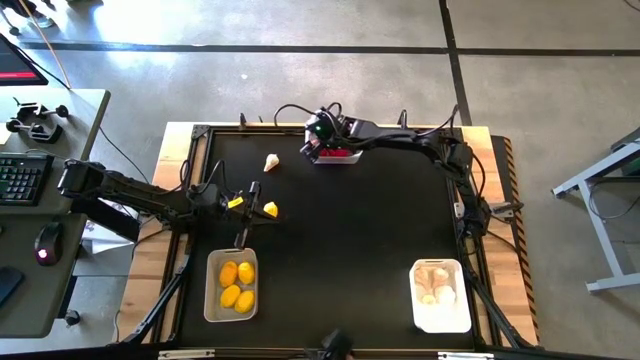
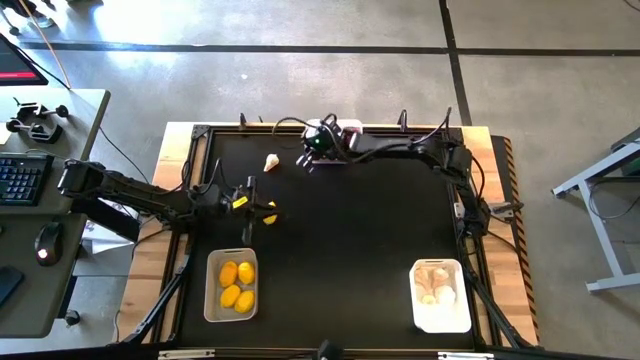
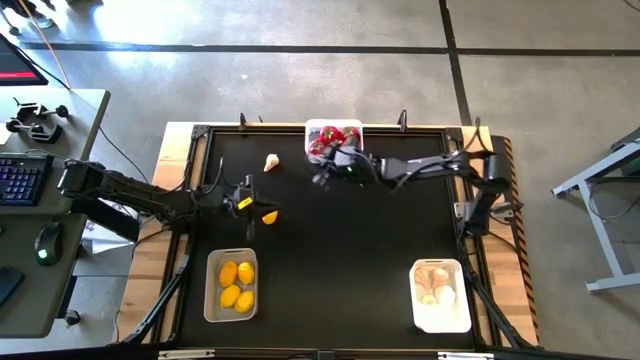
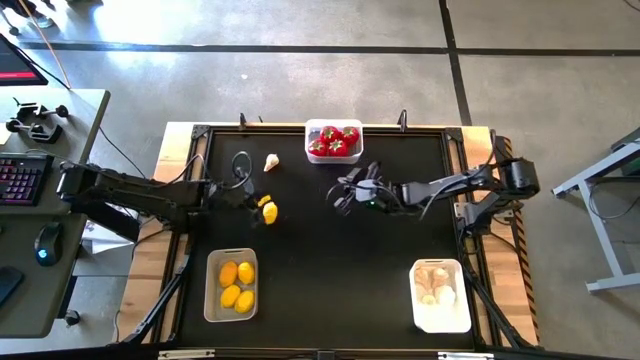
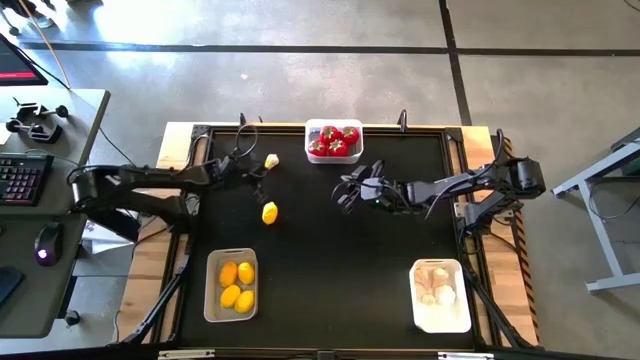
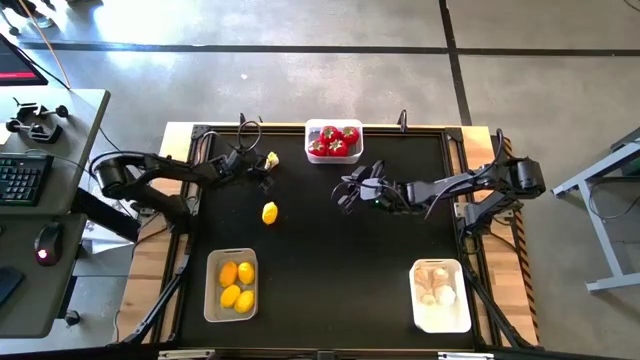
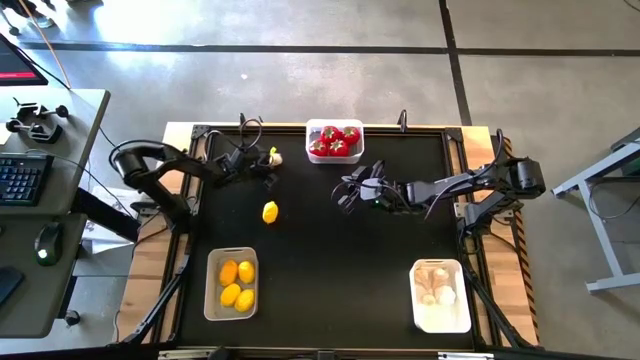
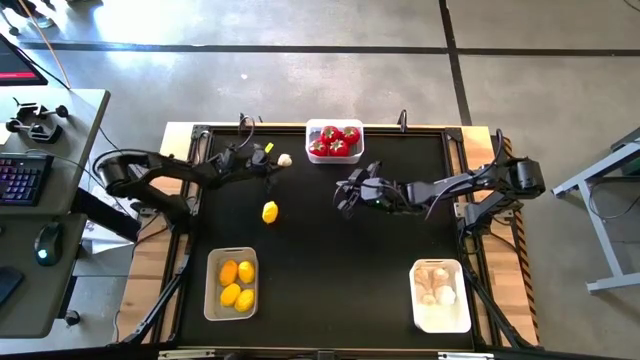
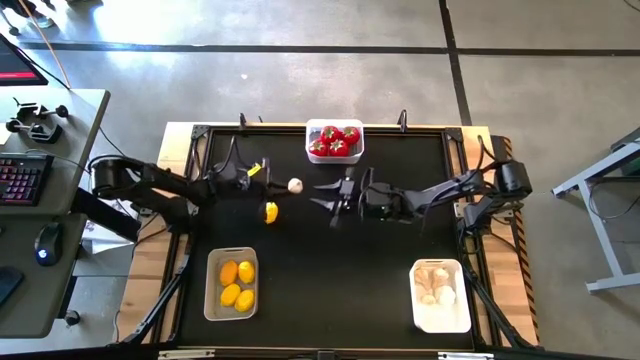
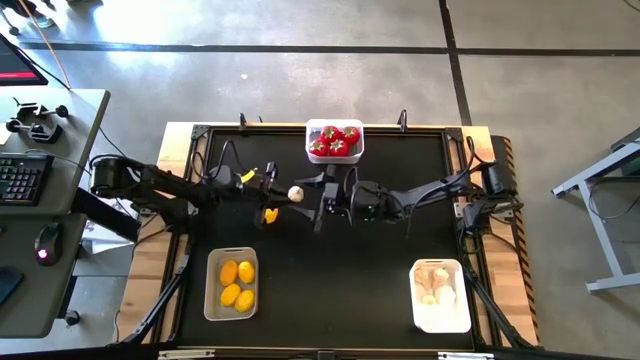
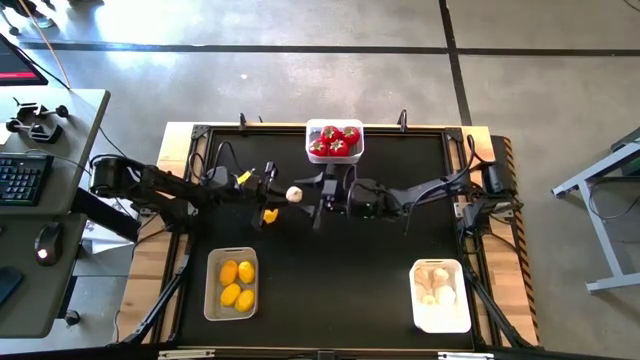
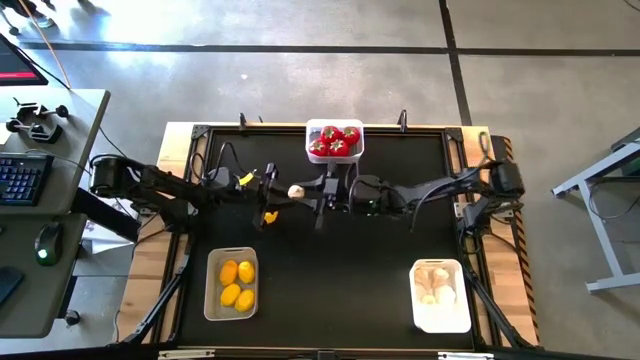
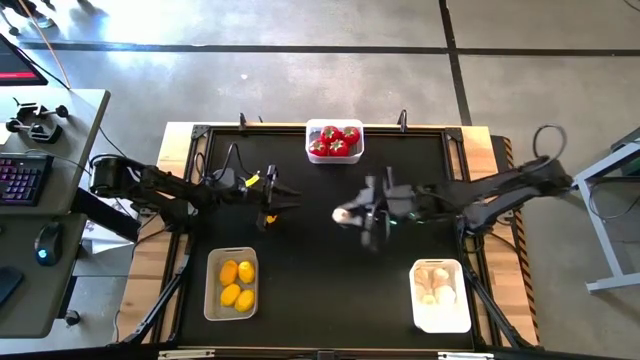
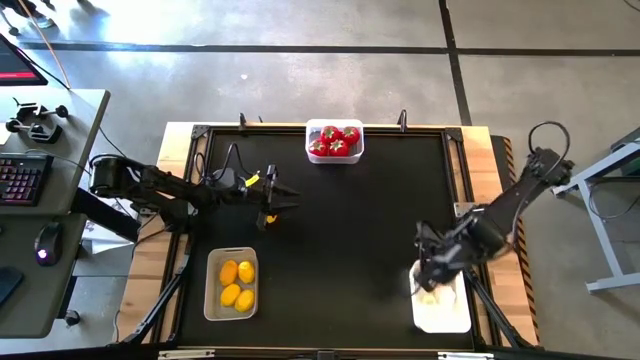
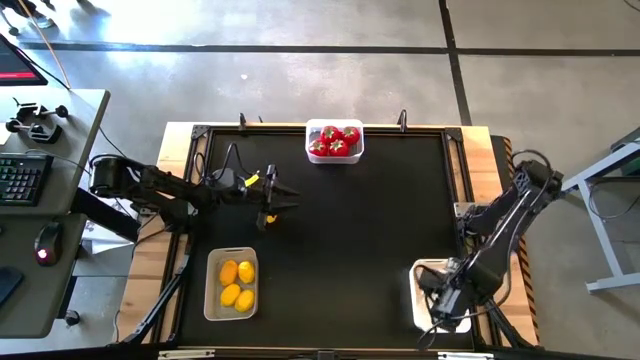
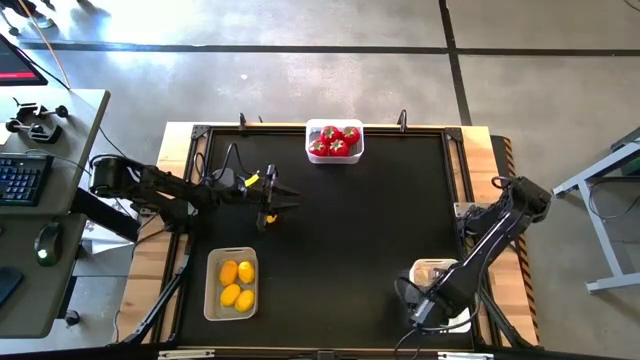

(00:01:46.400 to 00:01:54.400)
Task: Sort produce into baskets
Put the white garlic into the white bin

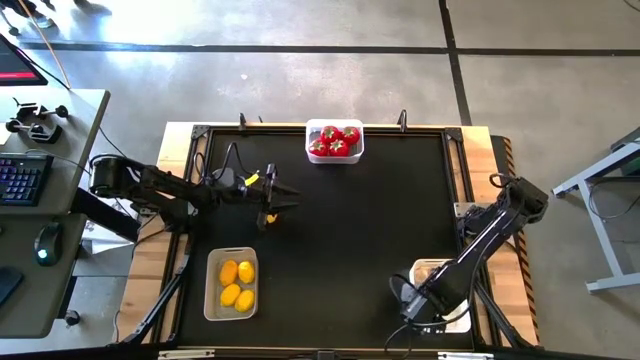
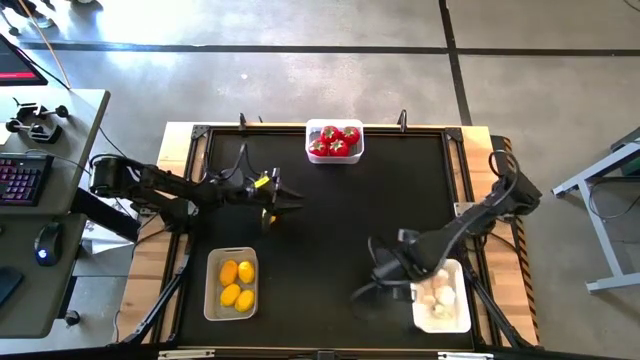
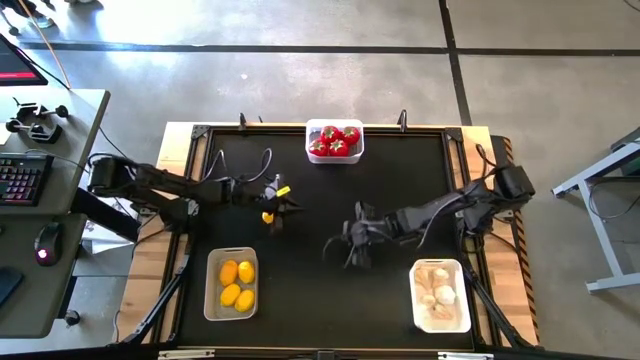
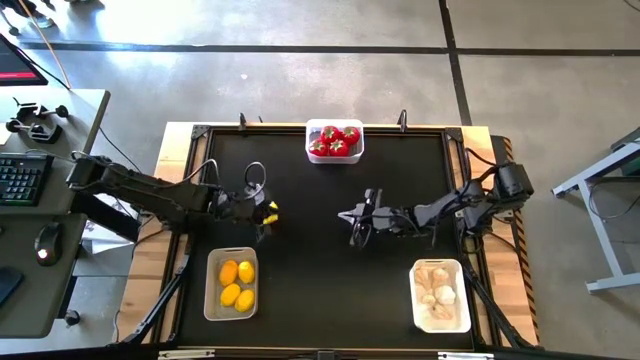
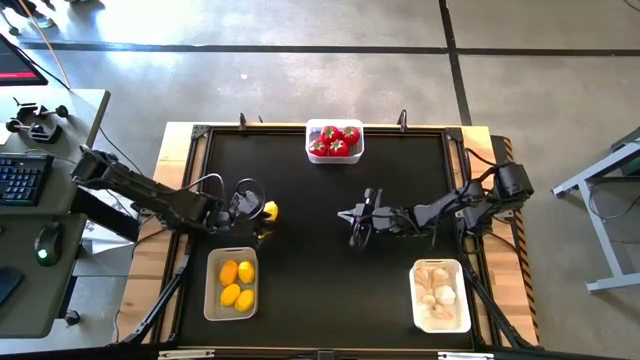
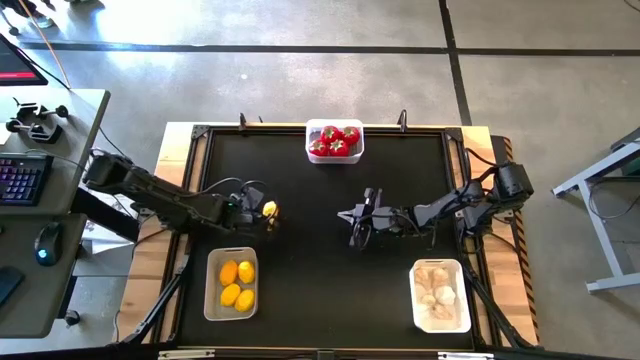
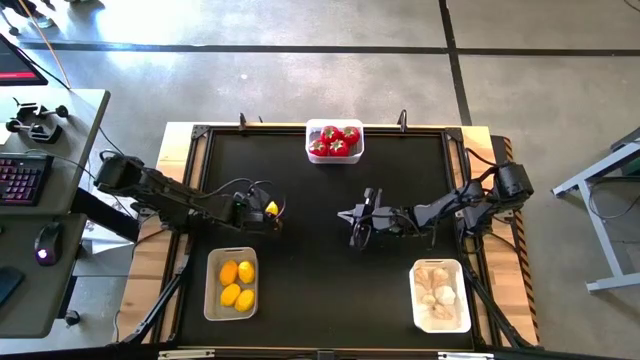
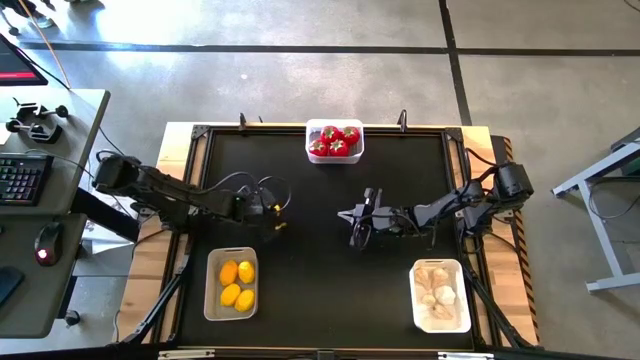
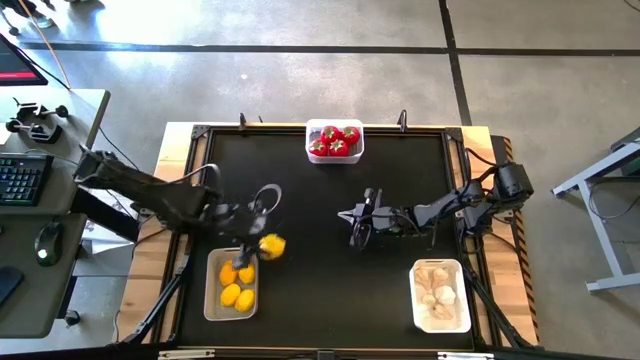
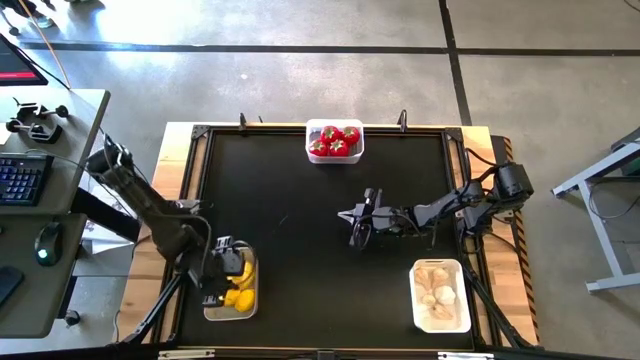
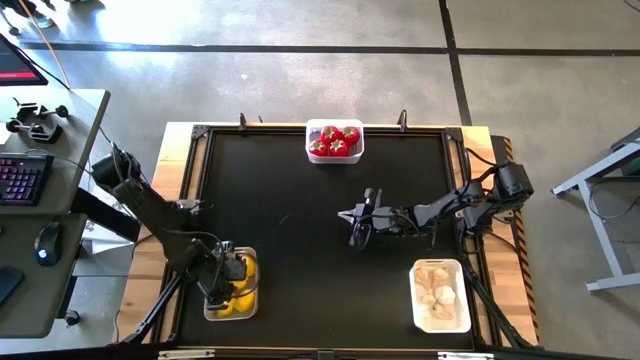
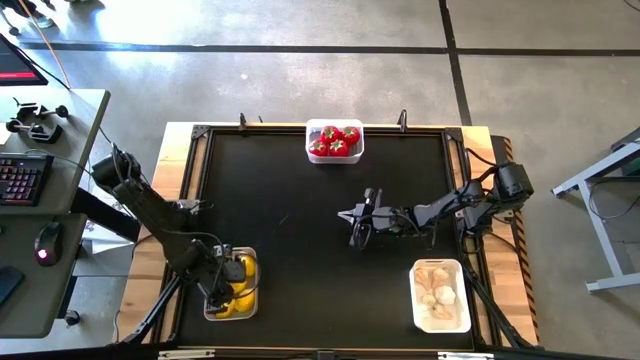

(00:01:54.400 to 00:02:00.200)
Put the yellow lemon into the gray bin

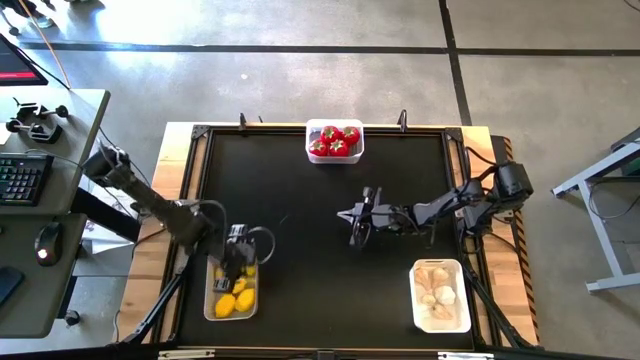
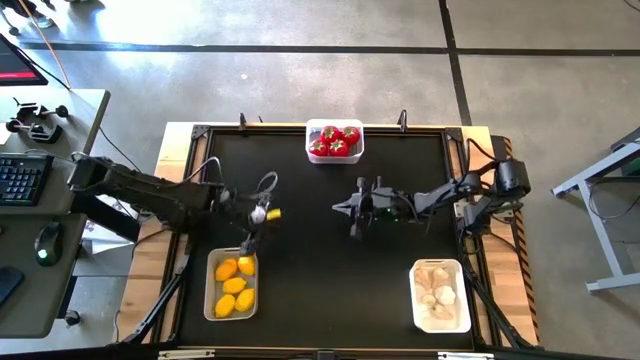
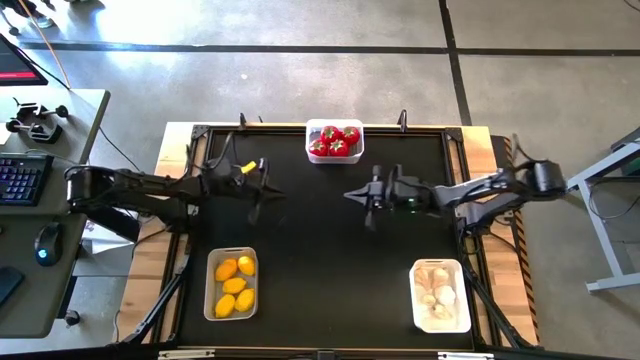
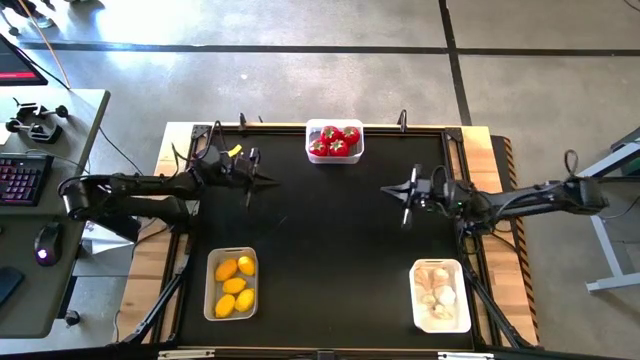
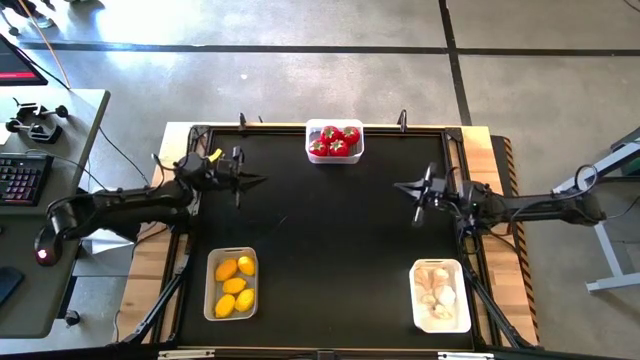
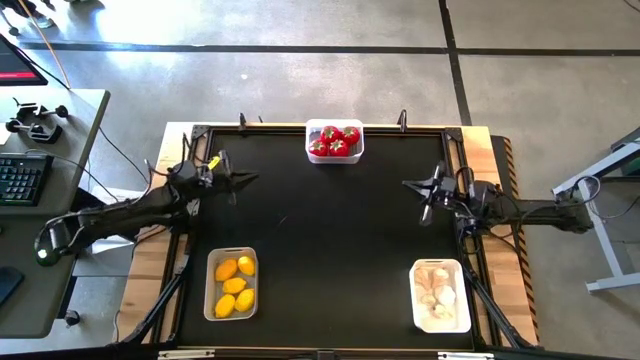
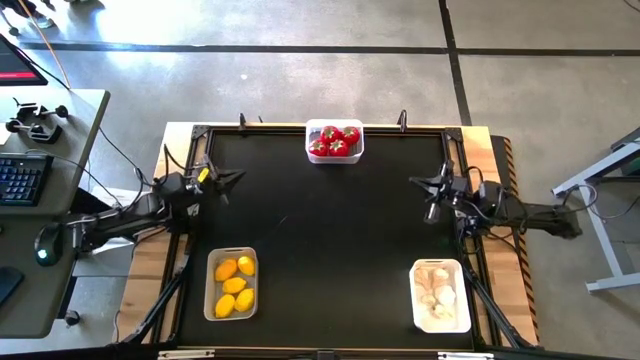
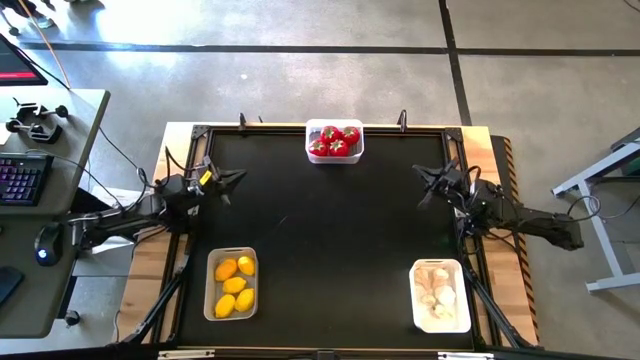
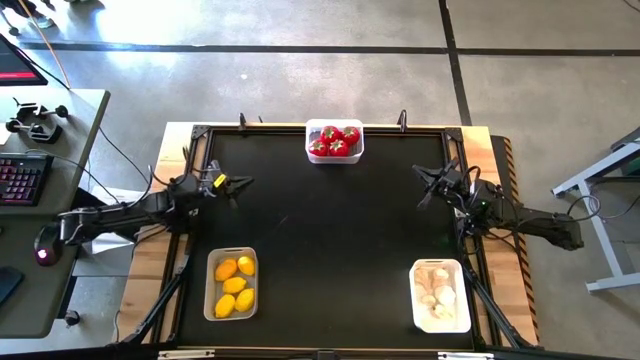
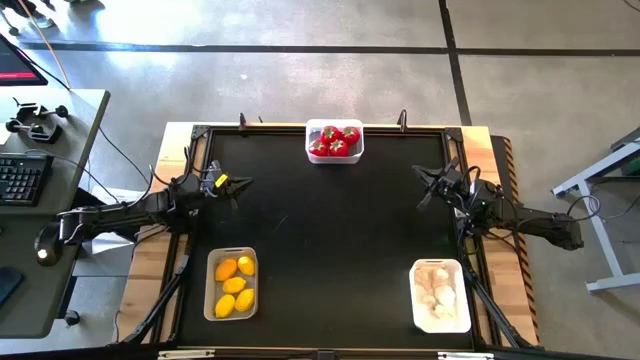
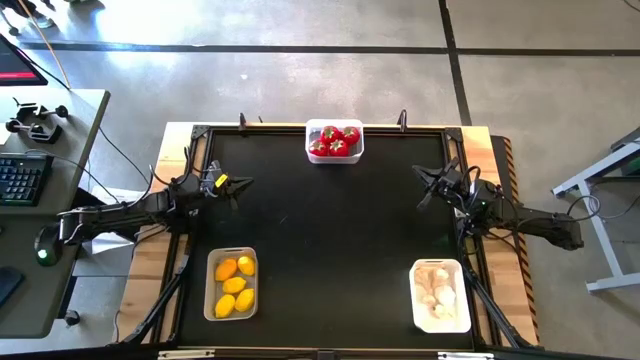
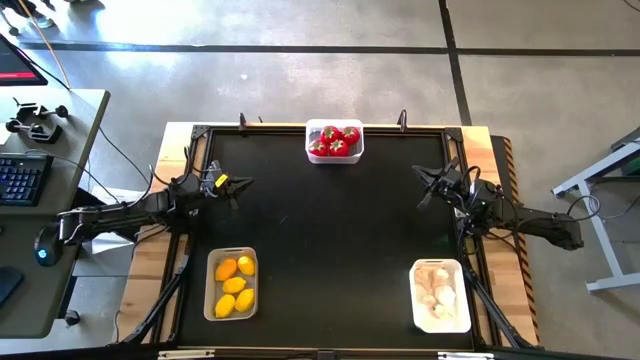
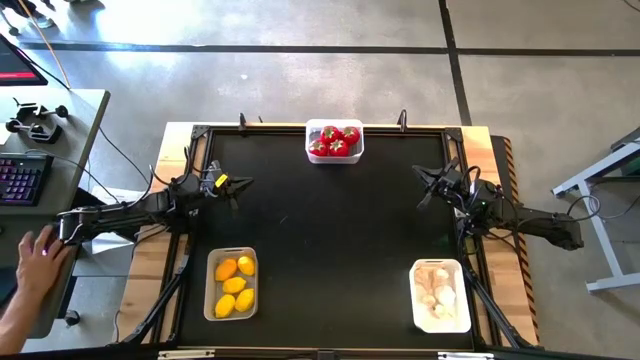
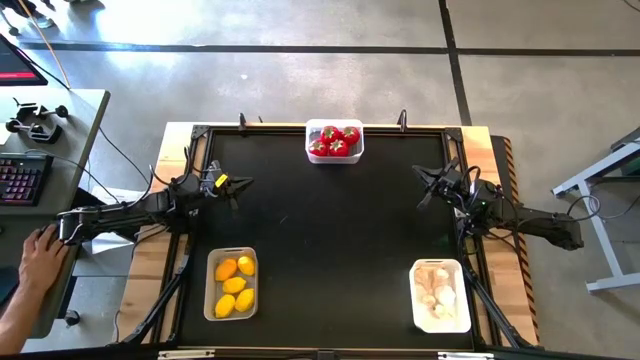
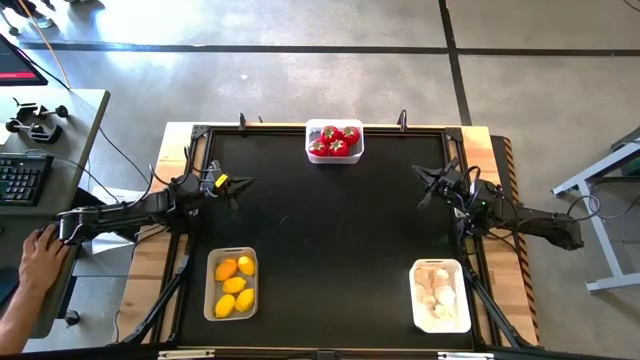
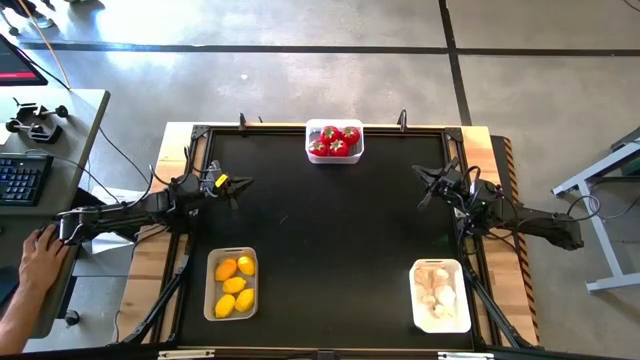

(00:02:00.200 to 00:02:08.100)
Return to Home Position
